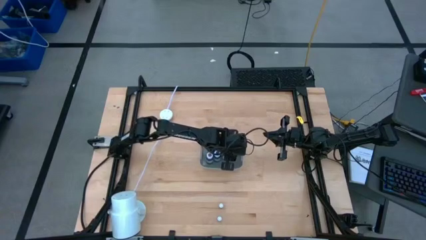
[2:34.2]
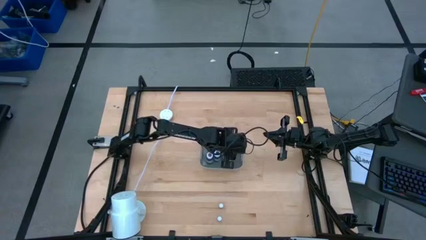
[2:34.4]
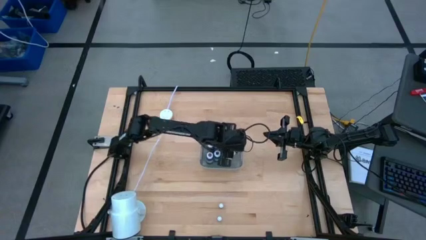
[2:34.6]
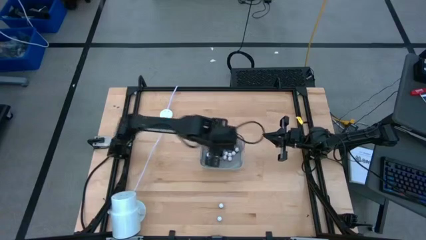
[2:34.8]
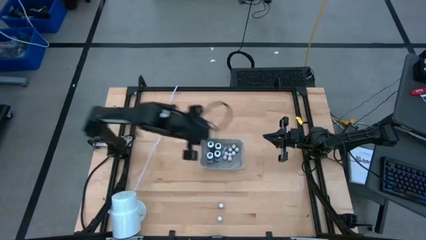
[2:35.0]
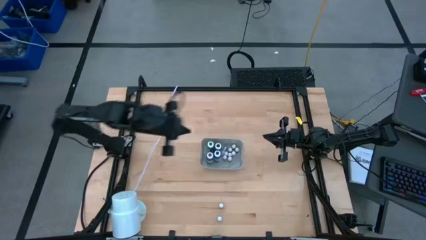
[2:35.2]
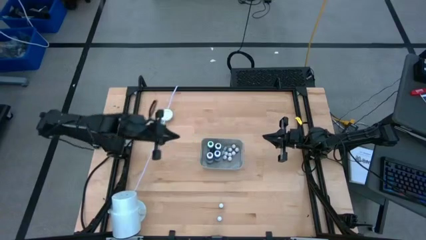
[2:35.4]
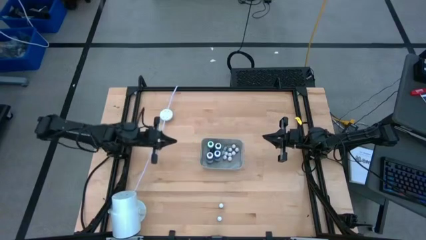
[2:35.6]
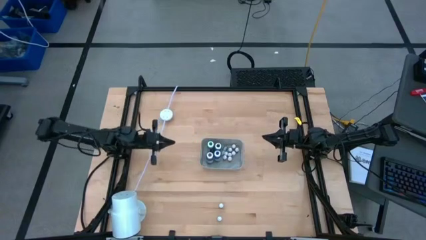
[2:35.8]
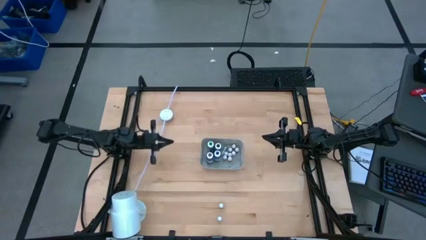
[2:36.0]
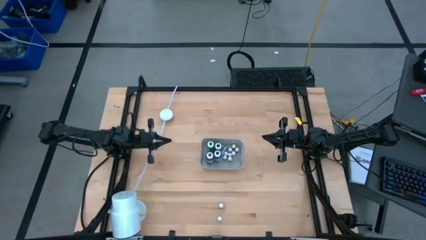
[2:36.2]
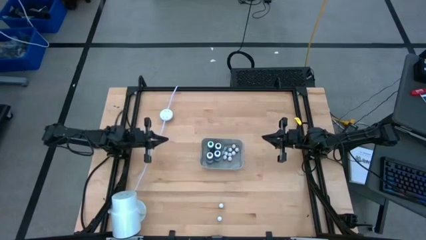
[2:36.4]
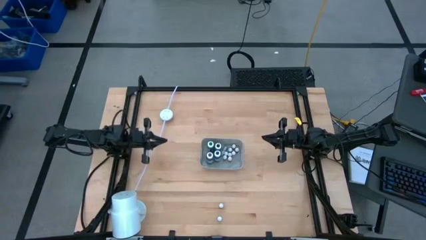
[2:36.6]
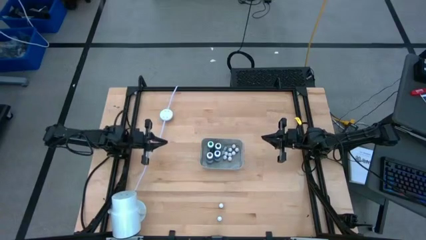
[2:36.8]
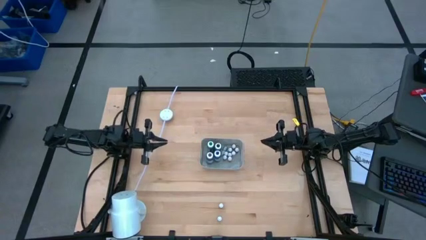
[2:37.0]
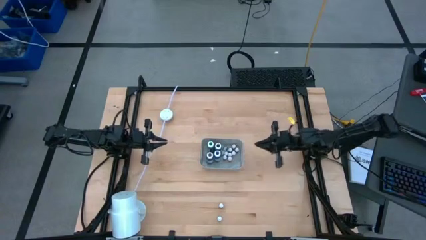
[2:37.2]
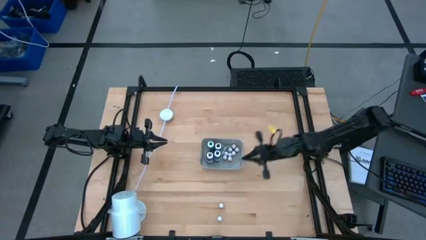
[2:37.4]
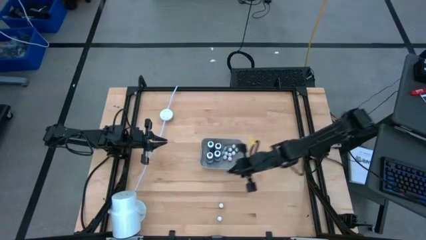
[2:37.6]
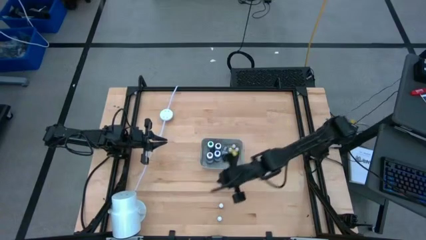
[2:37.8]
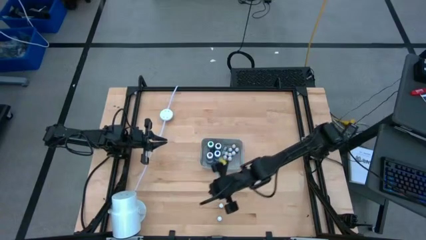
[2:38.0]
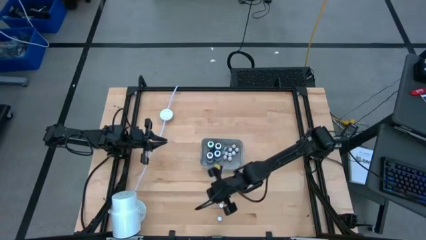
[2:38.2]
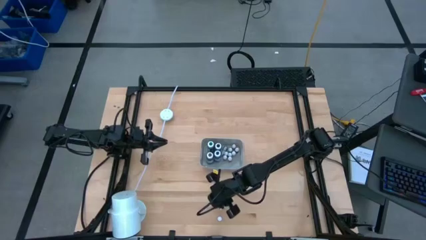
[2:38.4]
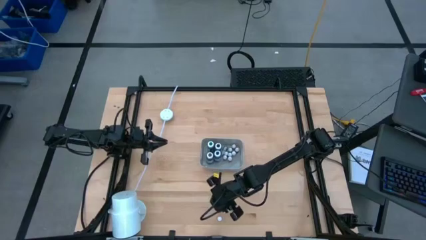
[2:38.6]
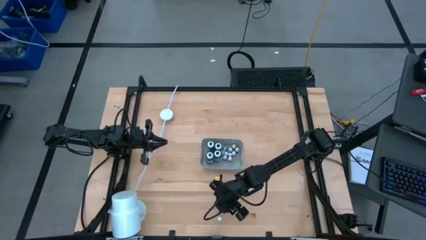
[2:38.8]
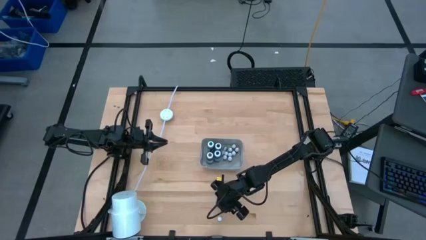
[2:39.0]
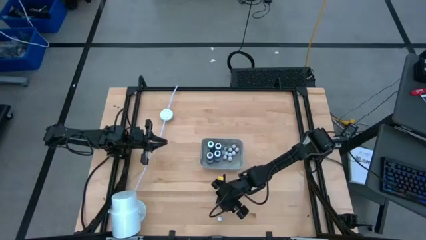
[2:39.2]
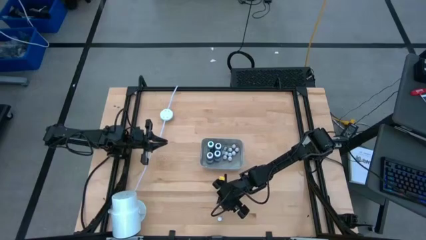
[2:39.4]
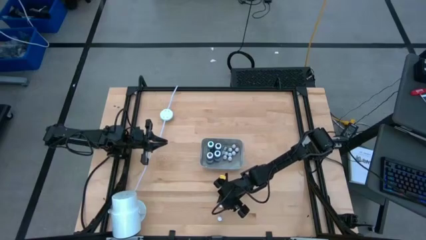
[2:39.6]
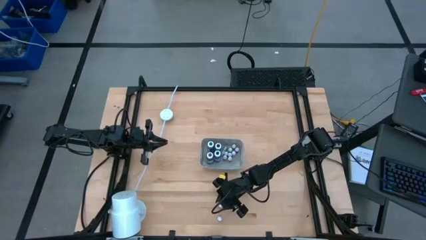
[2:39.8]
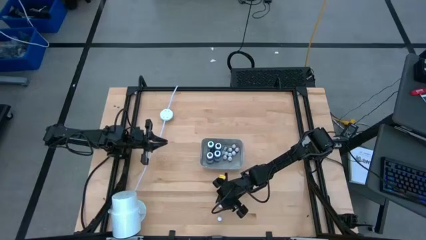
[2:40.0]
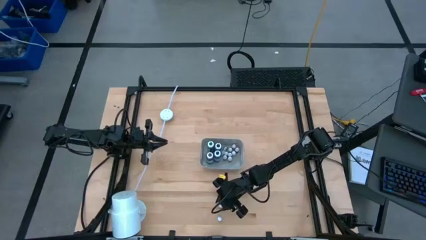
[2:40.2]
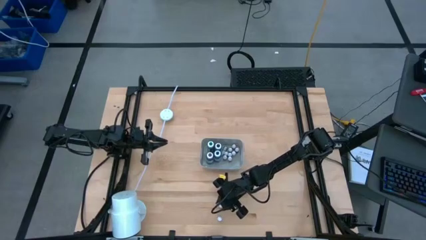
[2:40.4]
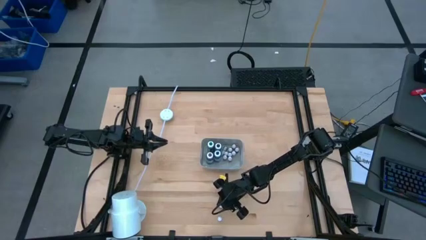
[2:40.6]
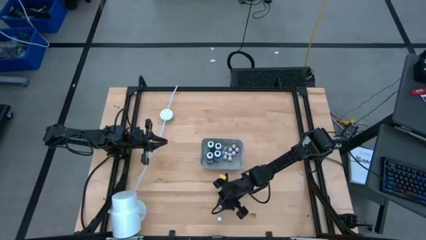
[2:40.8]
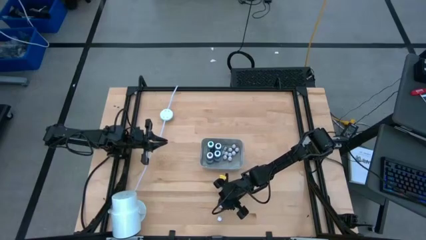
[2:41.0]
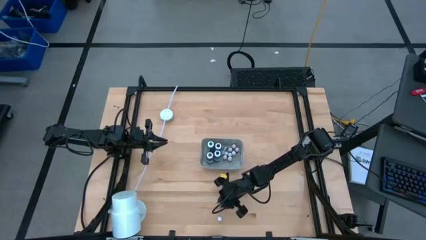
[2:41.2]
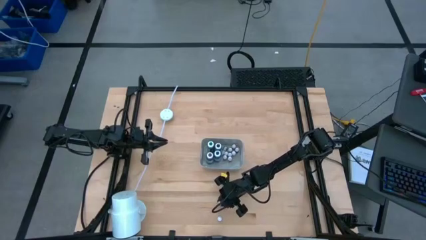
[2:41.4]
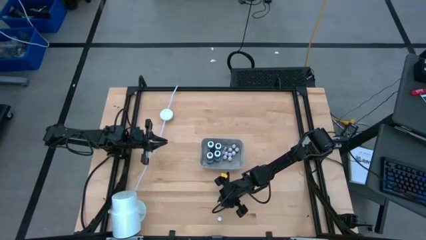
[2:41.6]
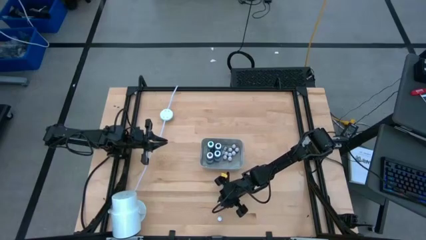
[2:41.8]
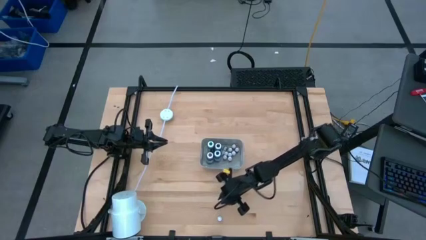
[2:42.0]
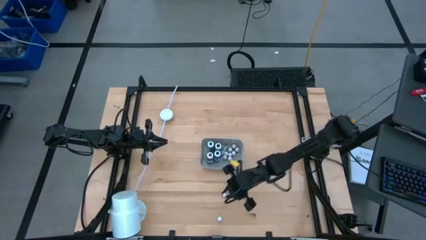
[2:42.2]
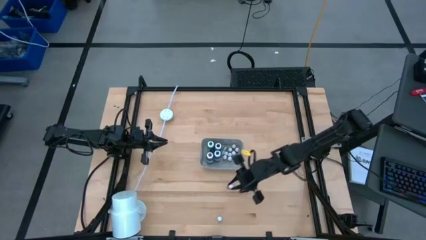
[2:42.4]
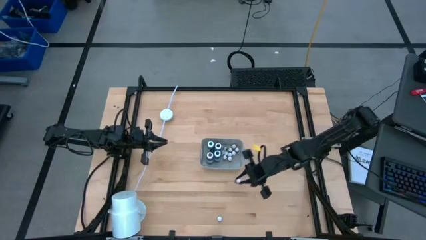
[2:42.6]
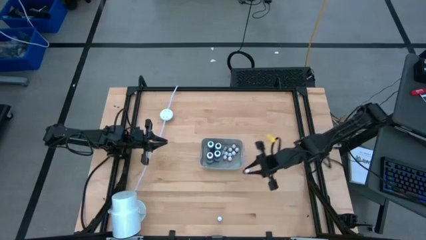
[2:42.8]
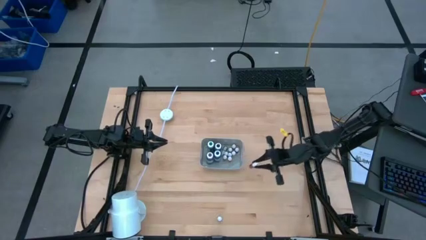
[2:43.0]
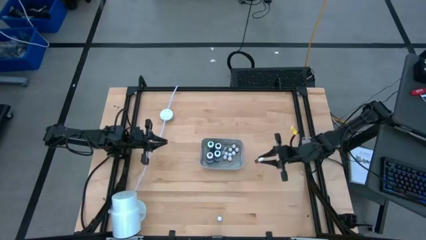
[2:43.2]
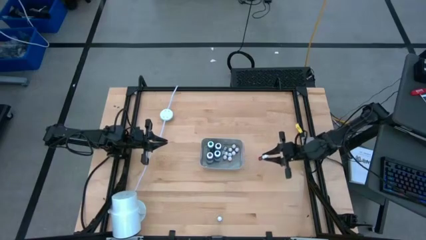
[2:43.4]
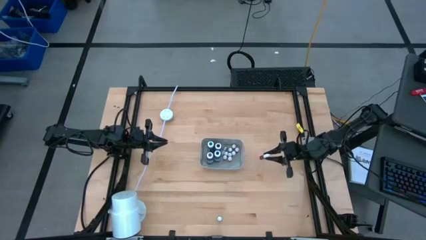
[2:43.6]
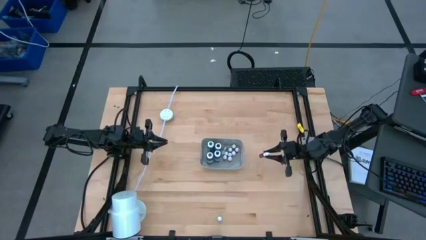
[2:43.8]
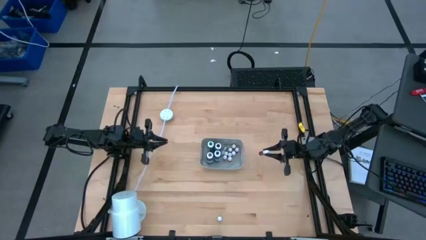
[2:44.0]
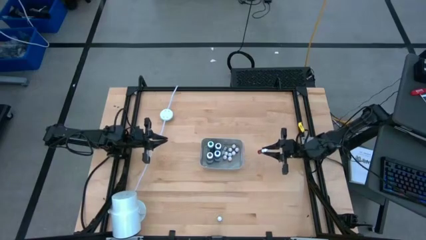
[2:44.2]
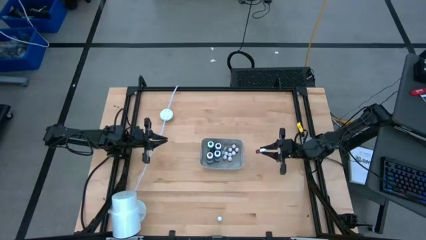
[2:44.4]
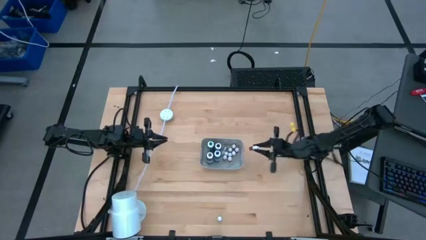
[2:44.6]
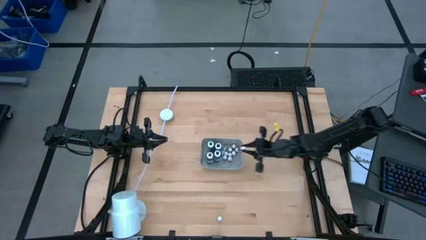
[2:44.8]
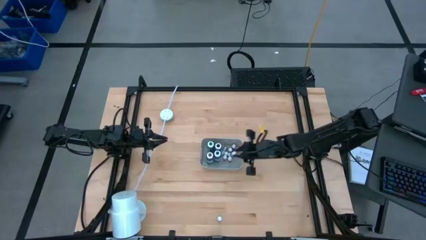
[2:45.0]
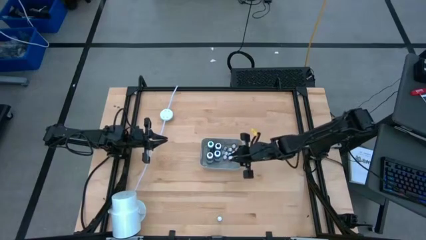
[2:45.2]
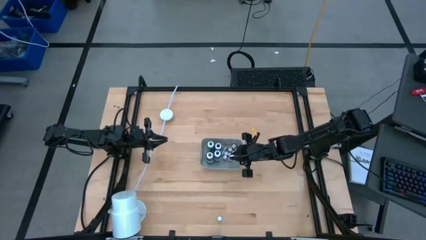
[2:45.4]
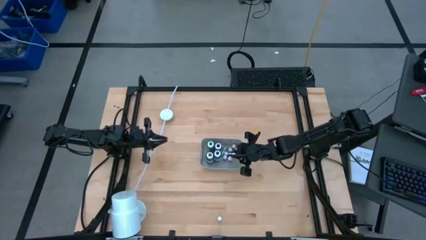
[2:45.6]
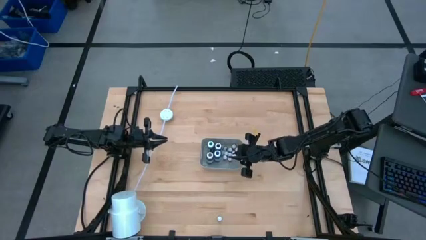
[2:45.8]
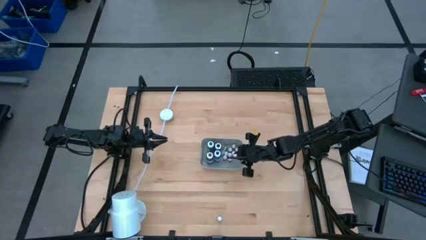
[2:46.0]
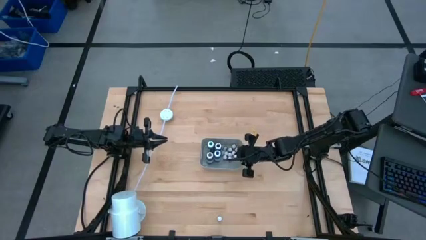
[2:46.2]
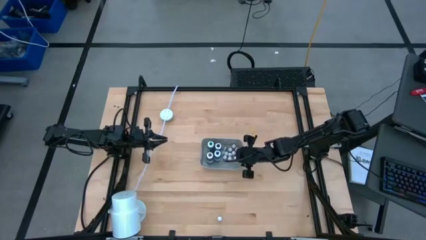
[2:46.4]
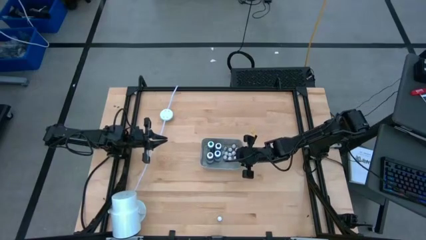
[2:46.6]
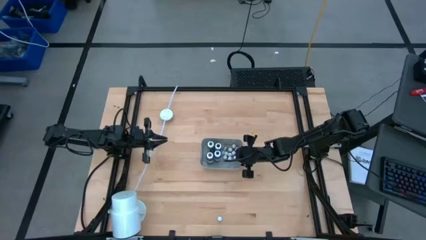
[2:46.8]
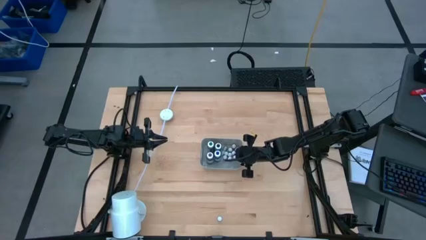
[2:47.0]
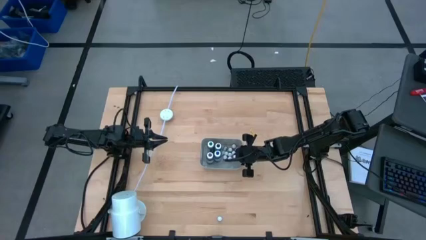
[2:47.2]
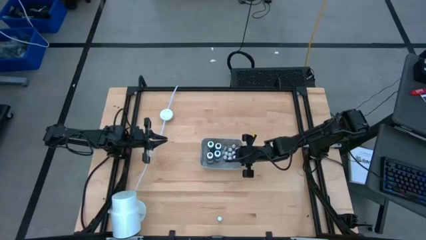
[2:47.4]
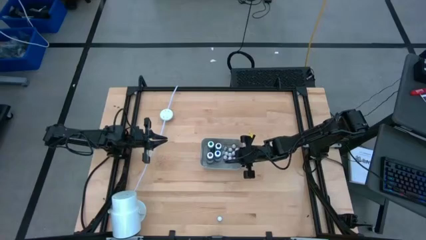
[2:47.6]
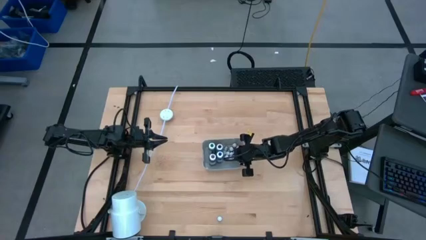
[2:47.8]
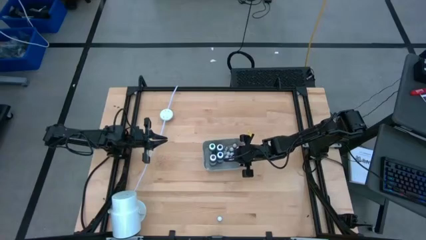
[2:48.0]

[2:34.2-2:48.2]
Task: Pick & Place food coloring
Put the small red food coloring bottle into the gray container

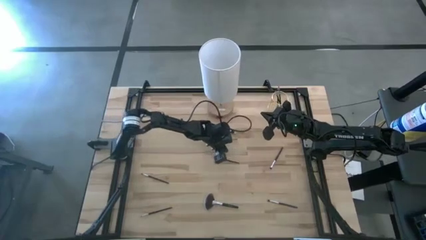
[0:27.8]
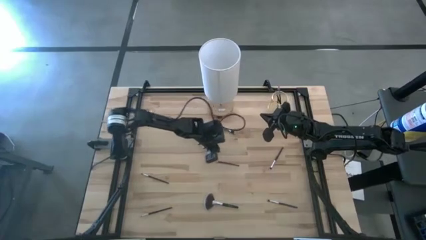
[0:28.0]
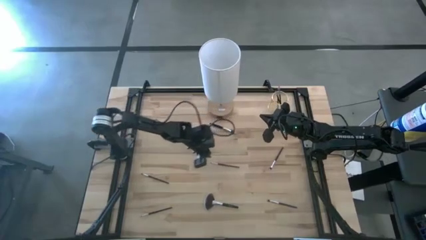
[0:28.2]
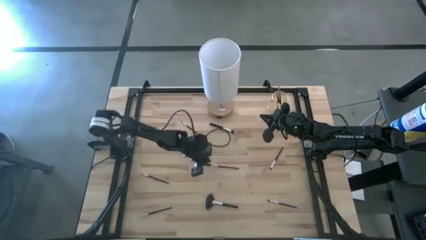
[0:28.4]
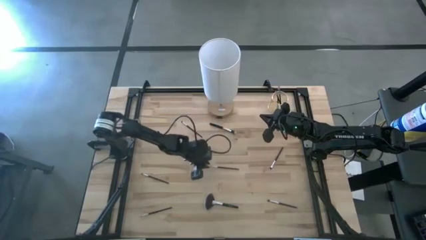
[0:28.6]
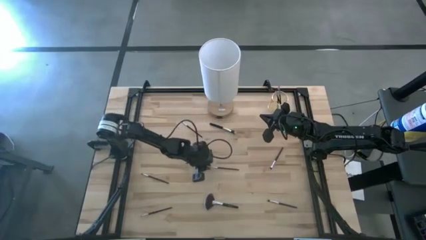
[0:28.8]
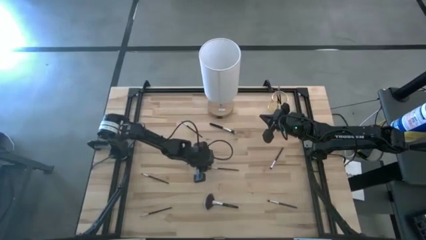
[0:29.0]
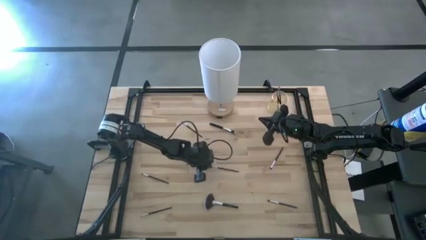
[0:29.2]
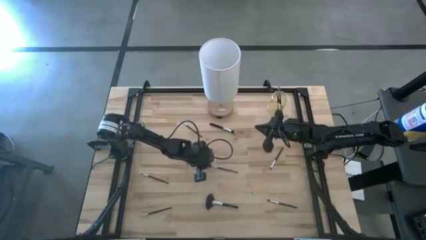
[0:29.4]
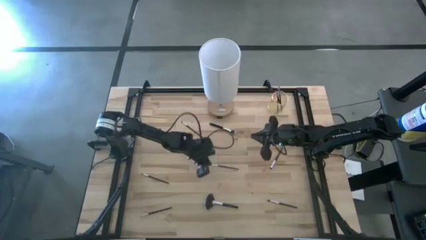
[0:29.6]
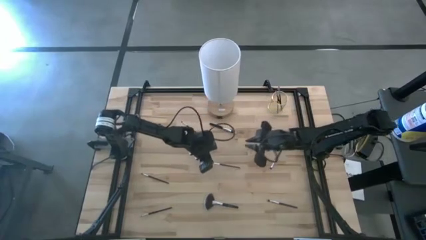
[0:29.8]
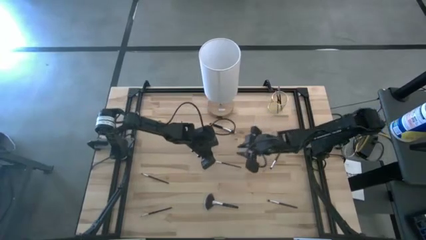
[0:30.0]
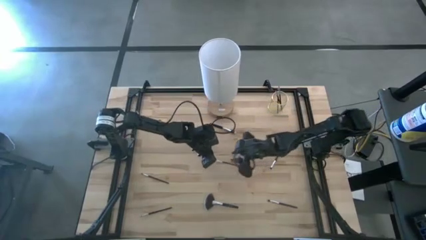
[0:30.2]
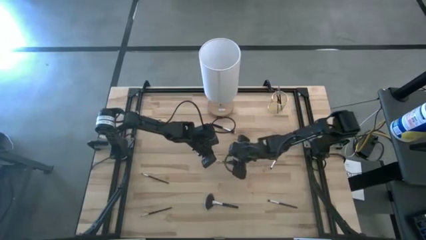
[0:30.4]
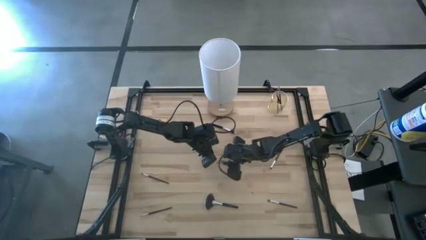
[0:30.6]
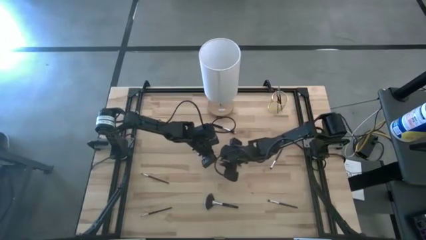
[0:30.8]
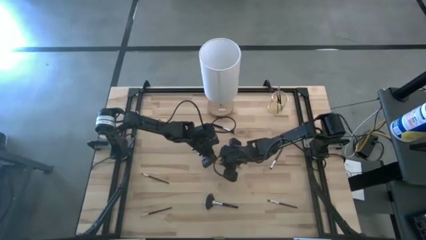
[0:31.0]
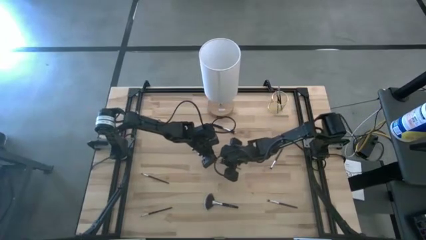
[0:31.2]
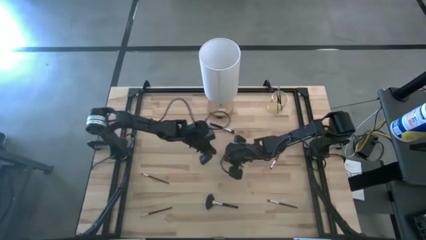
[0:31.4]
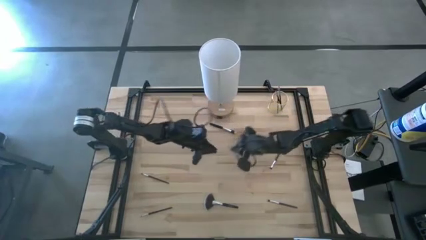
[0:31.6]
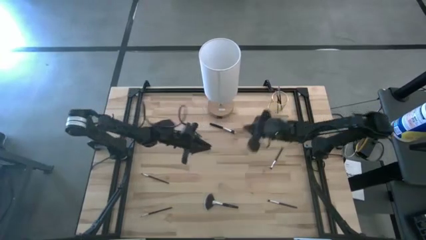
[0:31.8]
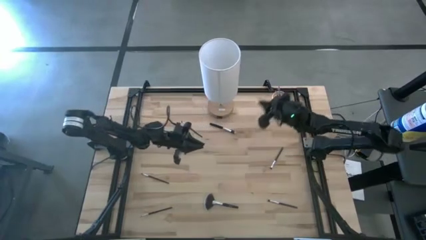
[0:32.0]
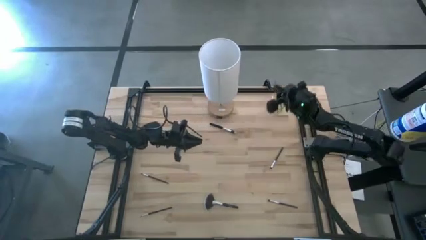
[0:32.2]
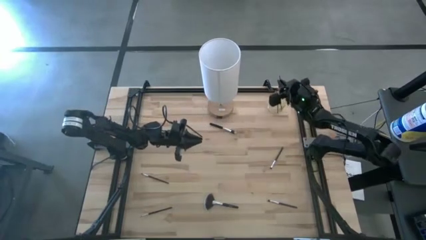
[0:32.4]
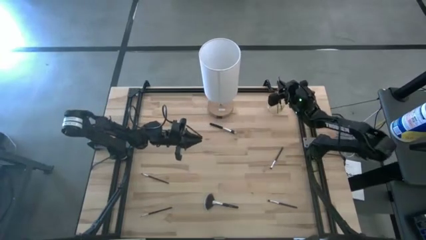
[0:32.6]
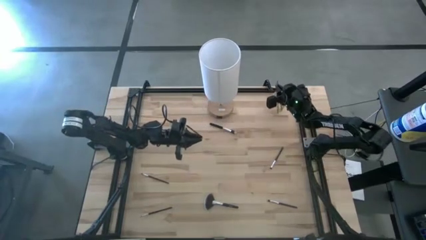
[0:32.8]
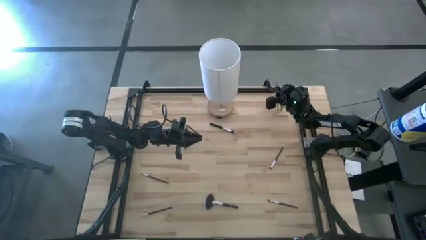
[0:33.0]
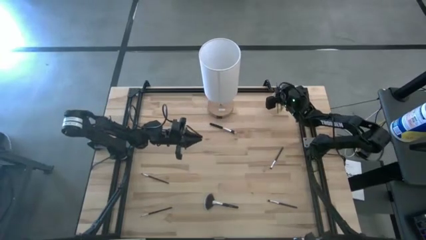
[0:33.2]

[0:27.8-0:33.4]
Task: Pick & Place Makeup Brushes
Put the eyeshadow brush into the makeup brush holder
